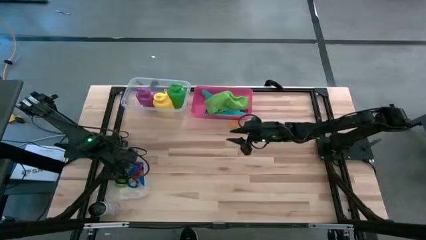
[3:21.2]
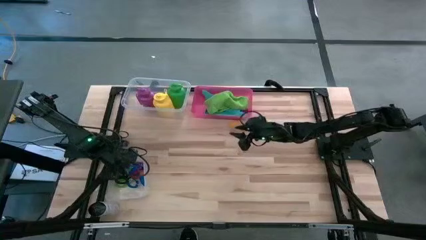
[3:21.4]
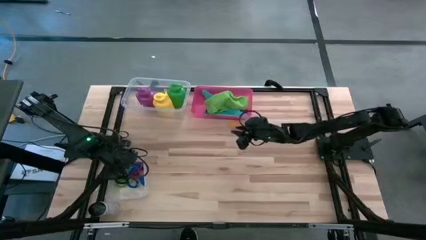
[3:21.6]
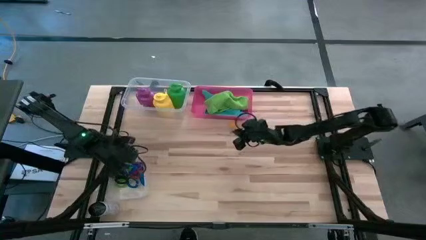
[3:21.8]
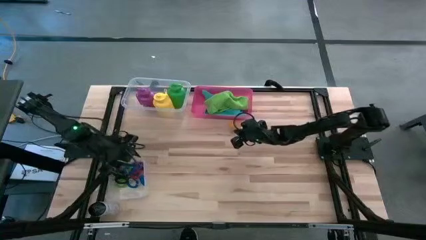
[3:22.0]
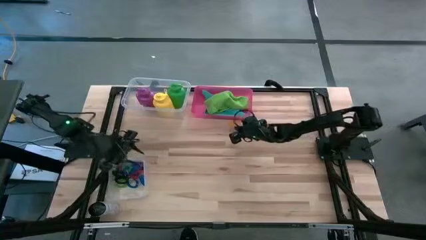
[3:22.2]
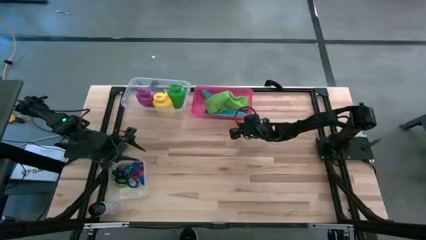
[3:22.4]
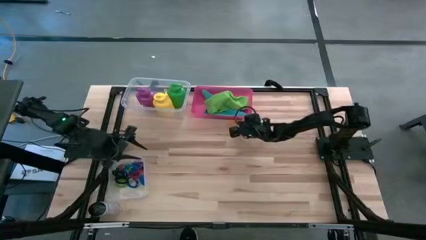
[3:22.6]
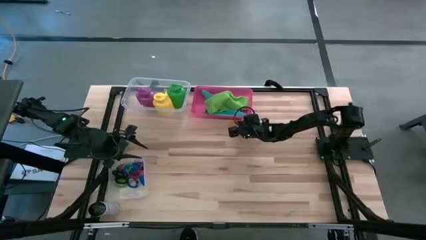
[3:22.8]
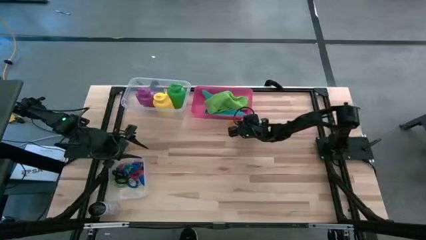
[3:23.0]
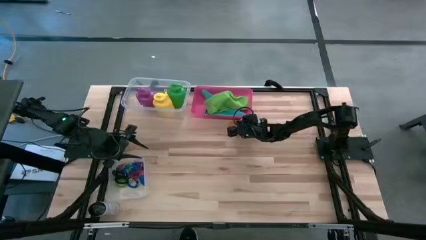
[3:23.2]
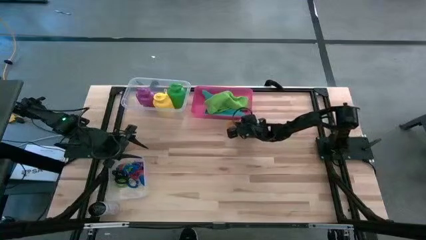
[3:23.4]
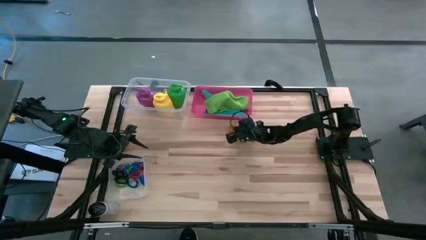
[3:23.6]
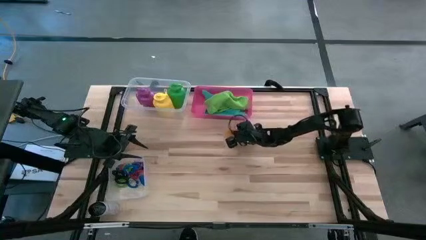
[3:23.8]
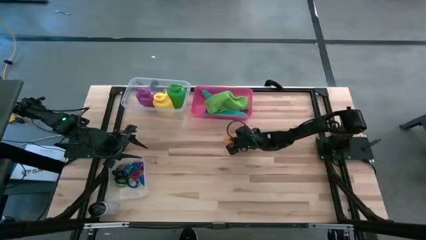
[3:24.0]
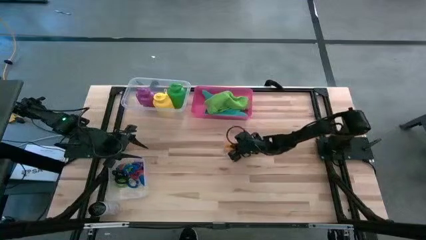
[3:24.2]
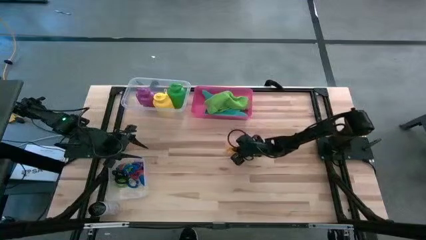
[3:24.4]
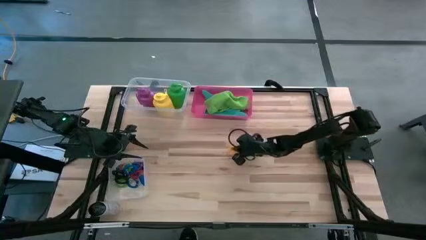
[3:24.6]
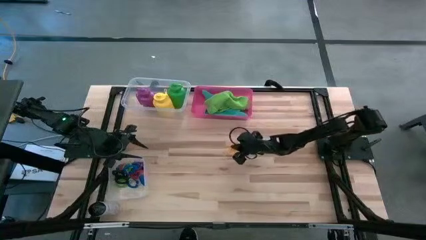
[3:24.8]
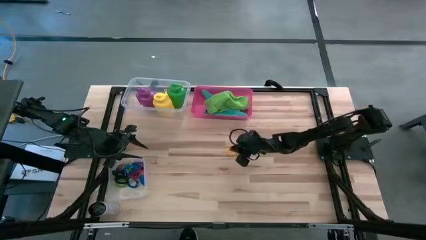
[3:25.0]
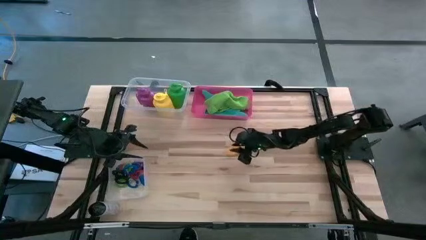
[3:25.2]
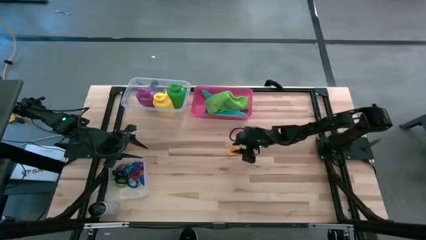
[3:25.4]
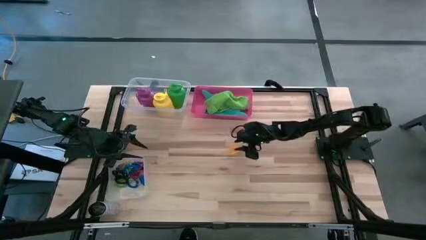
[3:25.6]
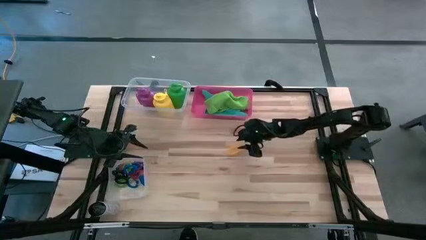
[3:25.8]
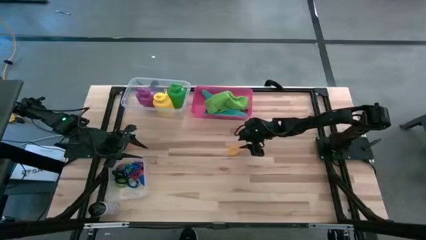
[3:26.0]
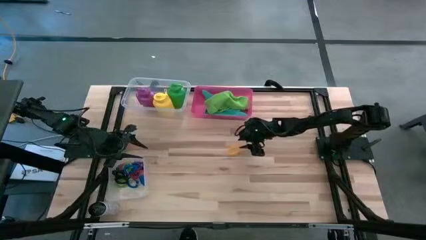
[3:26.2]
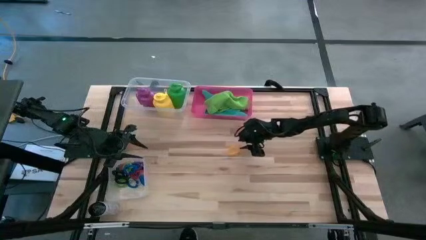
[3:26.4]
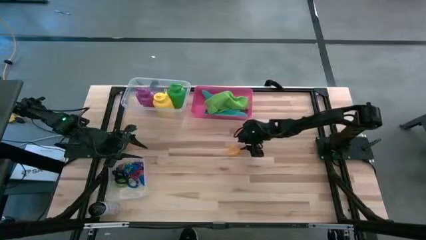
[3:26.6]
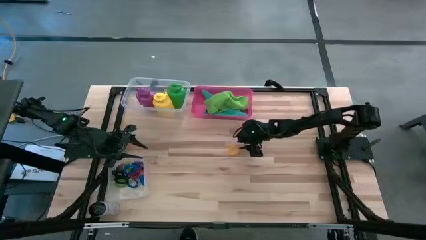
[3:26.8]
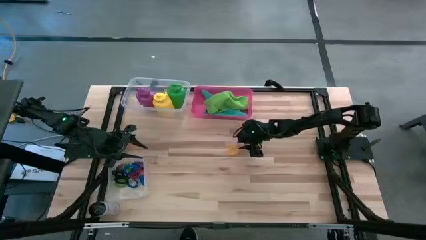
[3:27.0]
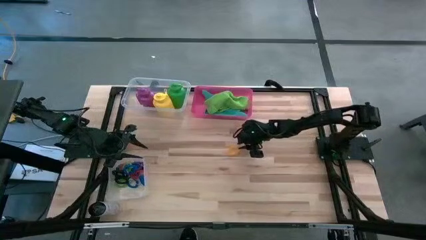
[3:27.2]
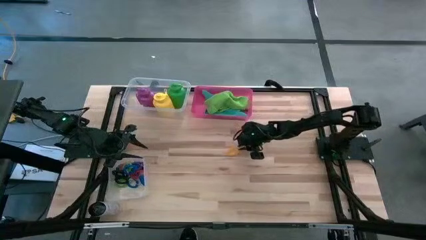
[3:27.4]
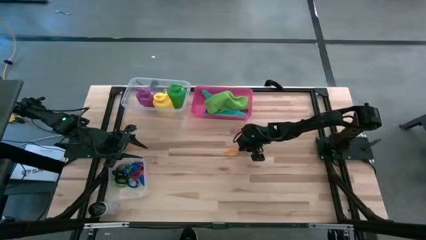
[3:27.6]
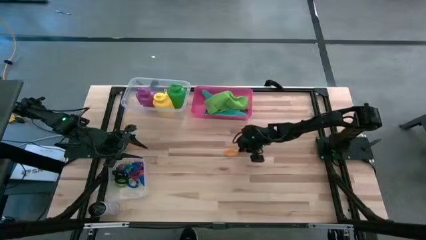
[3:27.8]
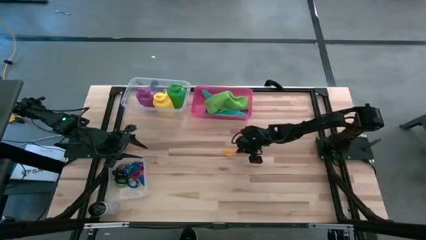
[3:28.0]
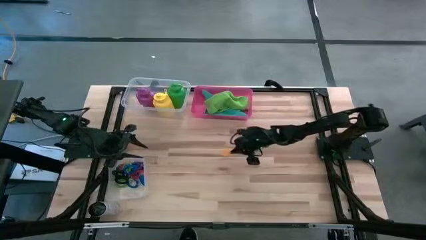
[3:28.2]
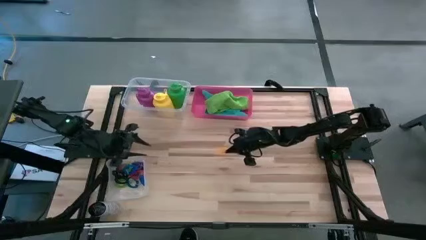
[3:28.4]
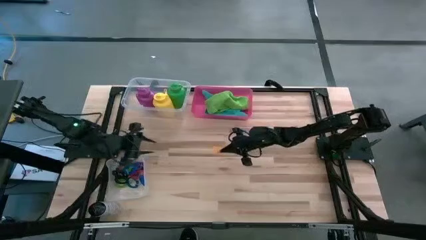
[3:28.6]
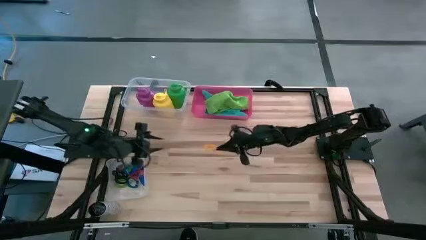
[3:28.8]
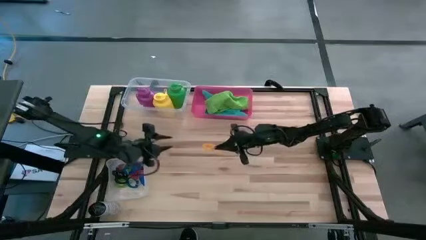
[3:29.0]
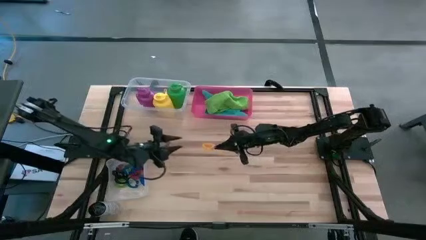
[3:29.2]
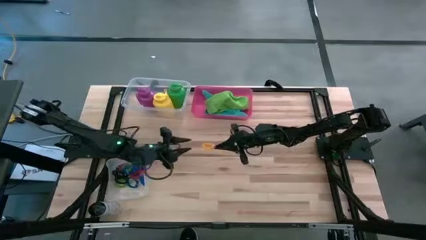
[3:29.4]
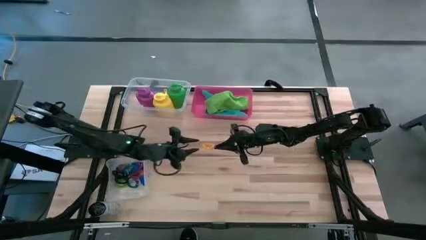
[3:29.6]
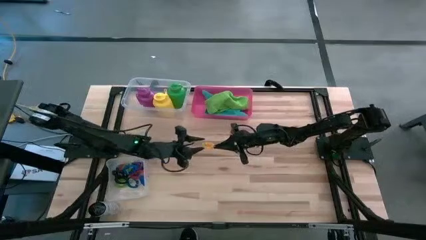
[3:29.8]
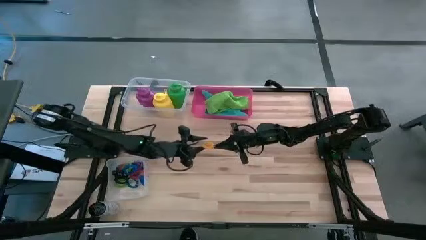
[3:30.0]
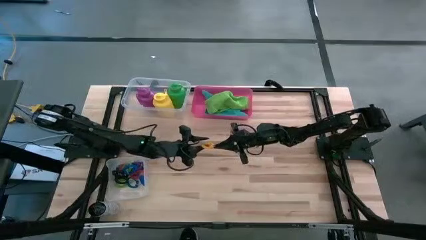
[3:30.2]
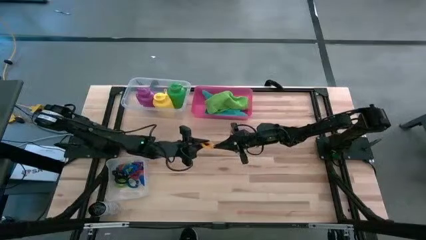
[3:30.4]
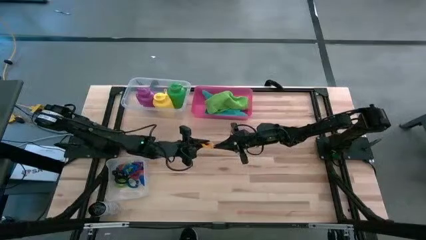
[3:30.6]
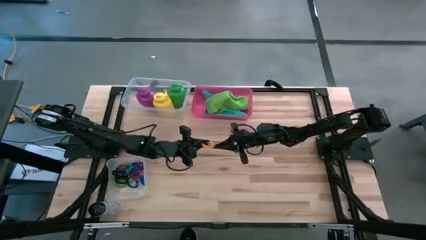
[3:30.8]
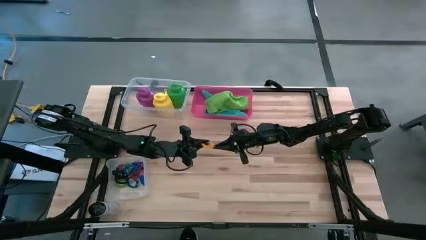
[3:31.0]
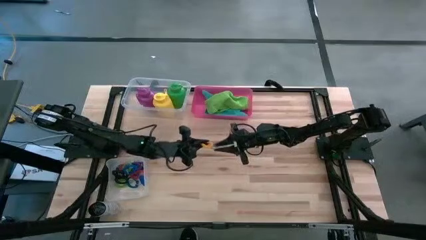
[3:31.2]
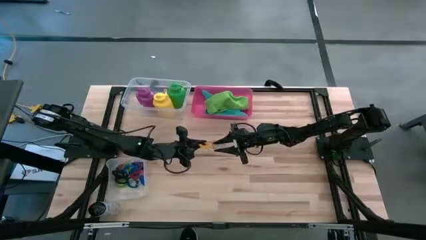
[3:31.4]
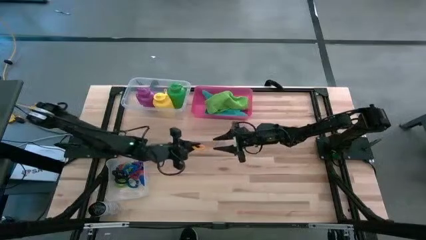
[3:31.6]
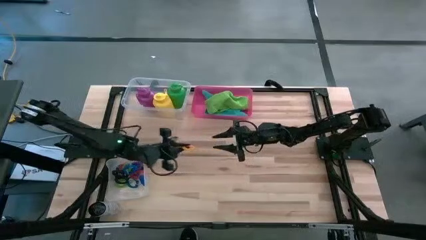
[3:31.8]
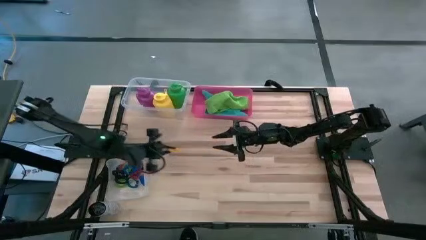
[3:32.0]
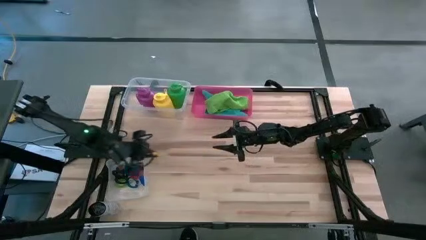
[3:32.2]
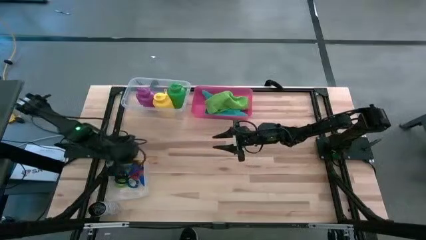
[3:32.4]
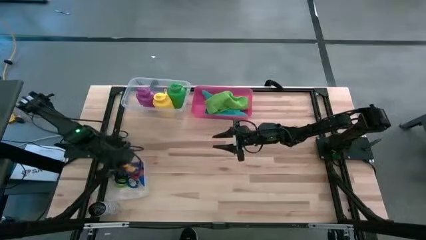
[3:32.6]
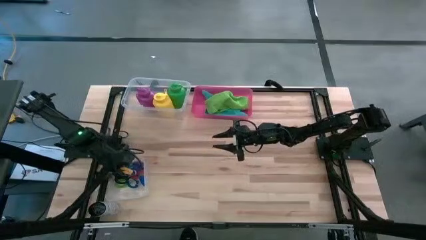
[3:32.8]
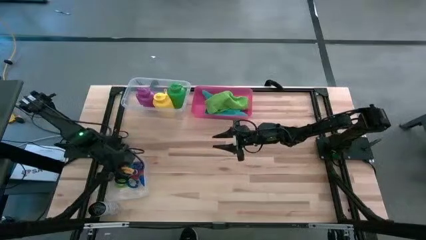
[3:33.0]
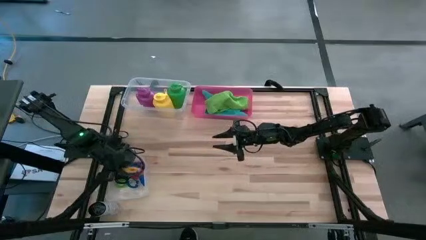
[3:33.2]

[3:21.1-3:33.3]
Task: Pick & Place Sports Items
Put the yellow spring keychain into the bottom transparent bin

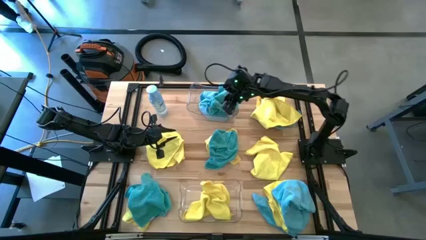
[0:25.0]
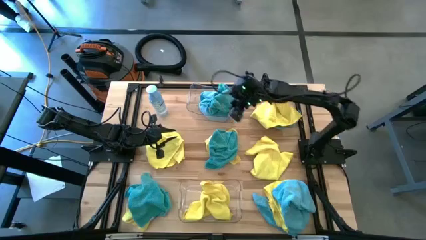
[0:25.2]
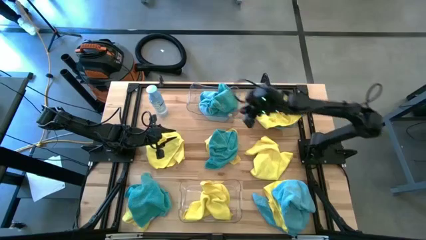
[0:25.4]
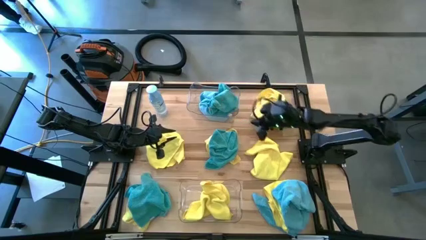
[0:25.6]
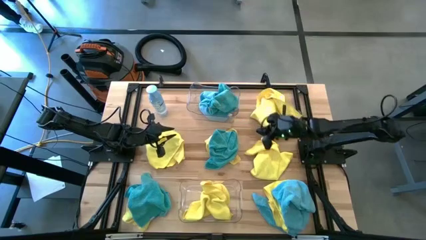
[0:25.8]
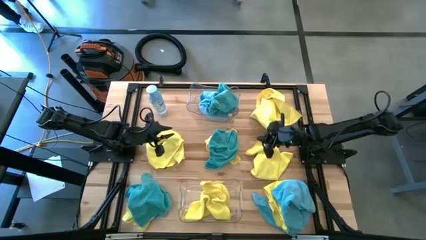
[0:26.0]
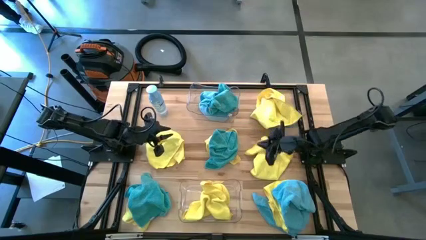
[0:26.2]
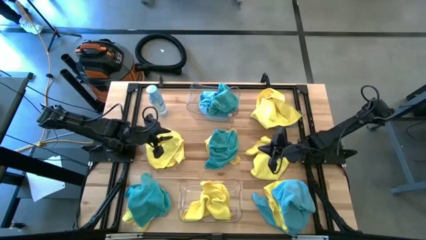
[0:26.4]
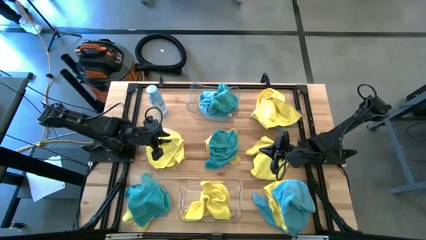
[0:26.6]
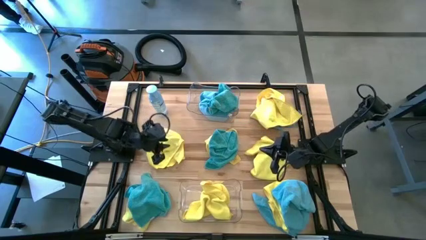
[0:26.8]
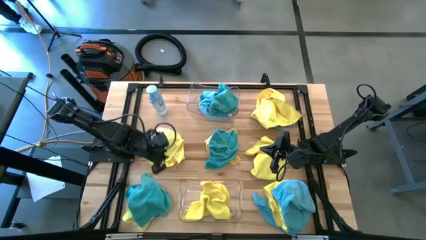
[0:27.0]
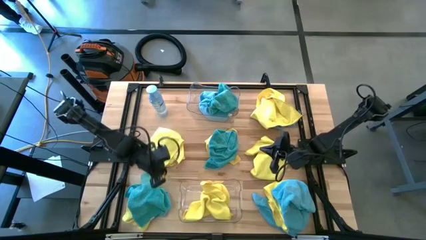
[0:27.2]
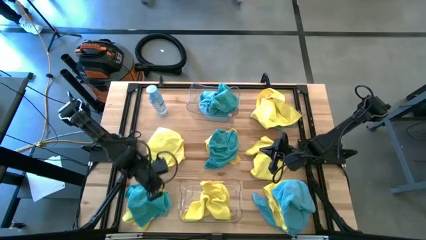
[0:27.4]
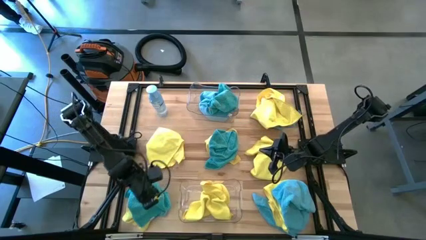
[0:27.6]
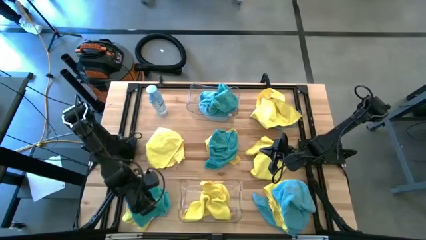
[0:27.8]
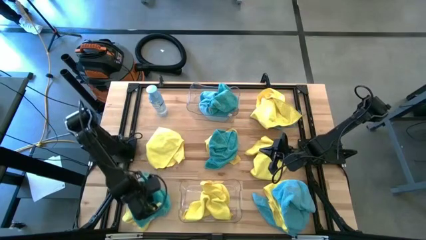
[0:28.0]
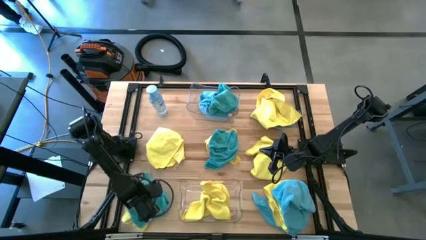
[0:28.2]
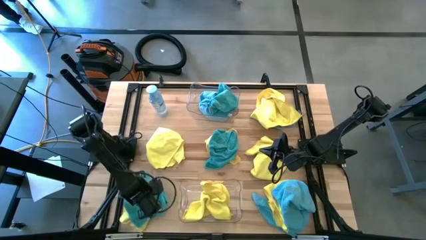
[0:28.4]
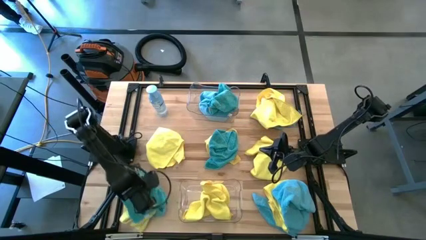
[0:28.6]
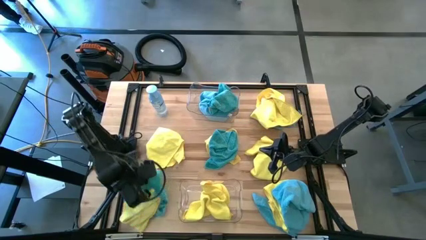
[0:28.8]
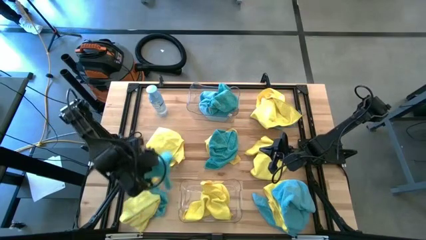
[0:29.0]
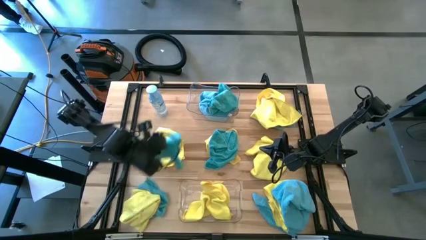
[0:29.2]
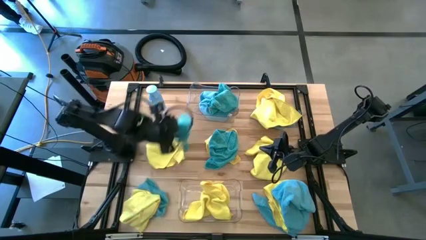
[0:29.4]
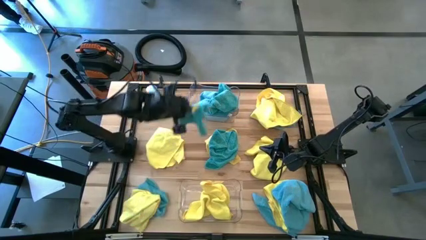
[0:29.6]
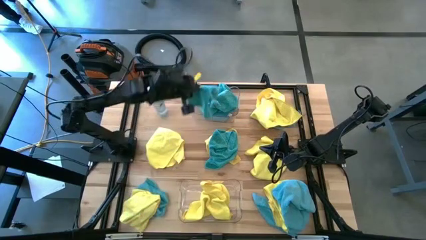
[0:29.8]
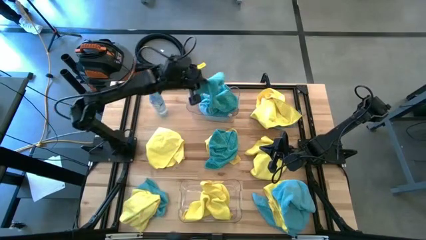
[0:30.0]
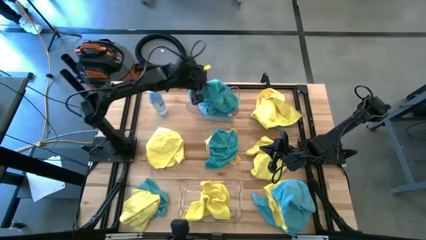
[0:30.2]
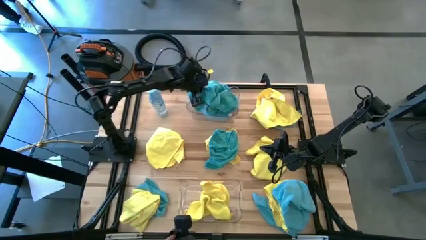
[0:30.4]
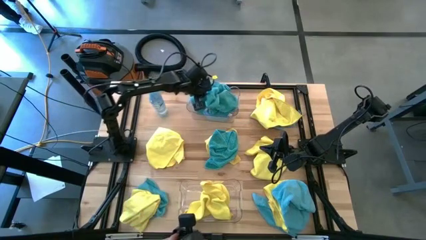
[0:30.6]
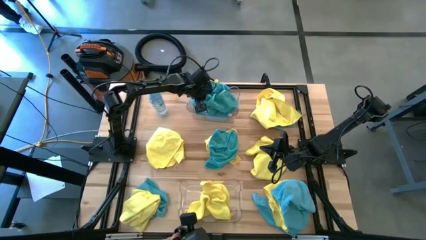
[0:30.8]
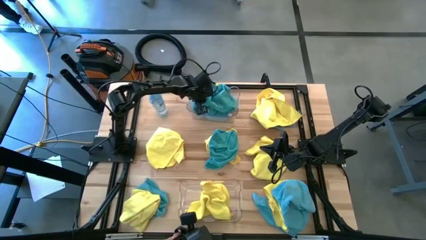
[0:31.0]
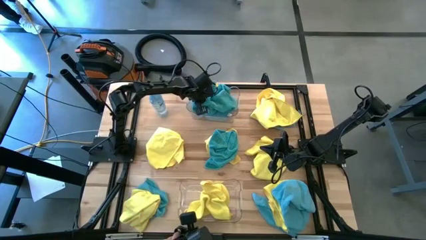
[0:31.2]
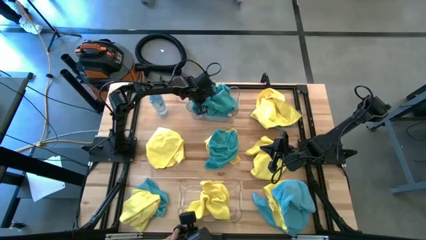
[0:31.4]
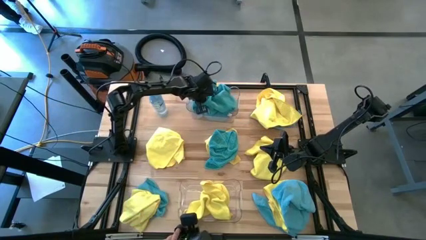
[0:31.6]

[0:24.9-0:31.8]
Task: Sort microfiber towel by color & place in baskets
Put the blue towel into the top transparent bin
